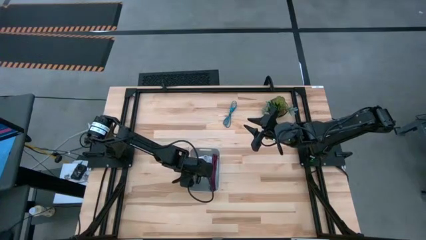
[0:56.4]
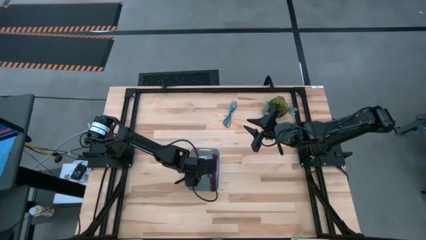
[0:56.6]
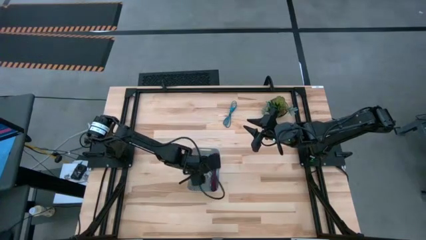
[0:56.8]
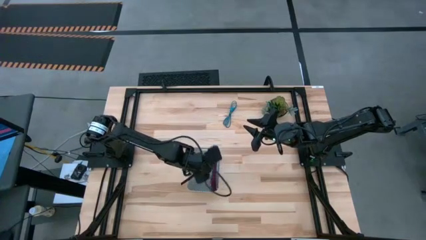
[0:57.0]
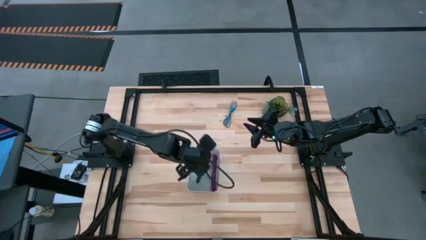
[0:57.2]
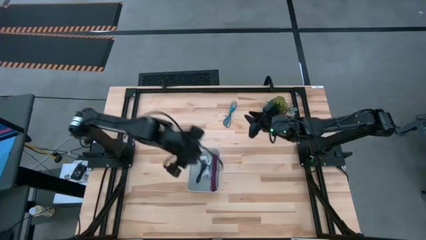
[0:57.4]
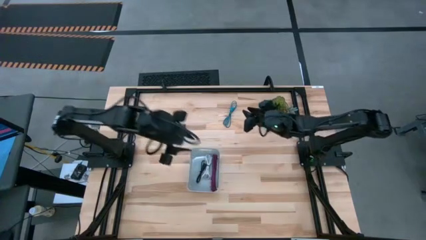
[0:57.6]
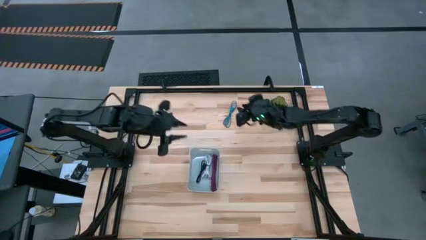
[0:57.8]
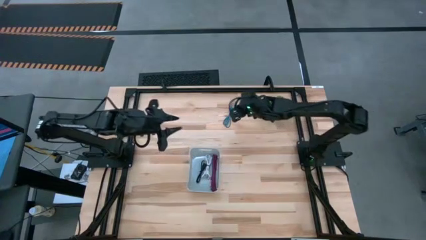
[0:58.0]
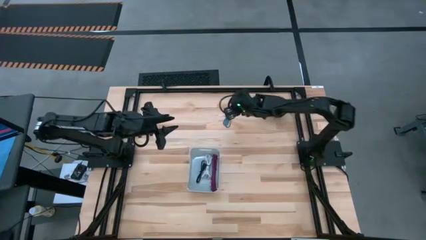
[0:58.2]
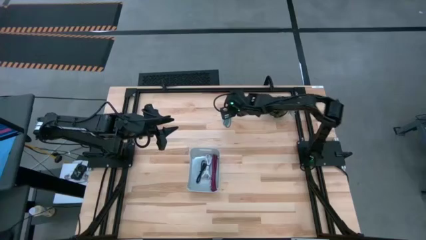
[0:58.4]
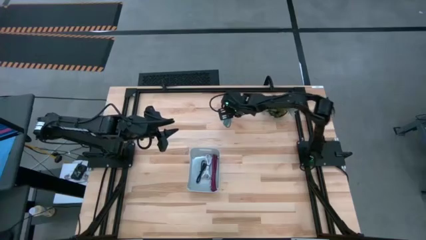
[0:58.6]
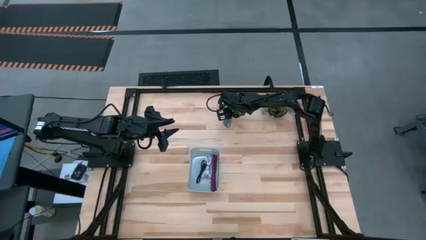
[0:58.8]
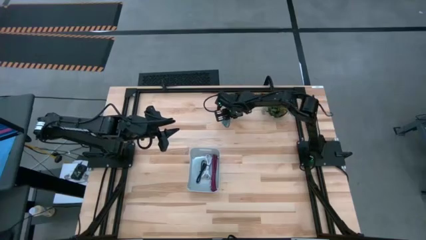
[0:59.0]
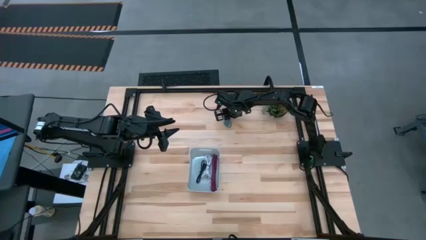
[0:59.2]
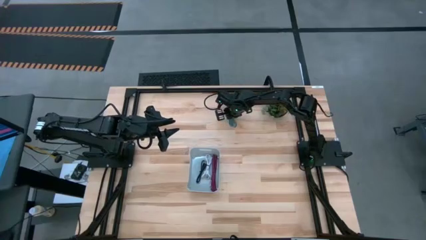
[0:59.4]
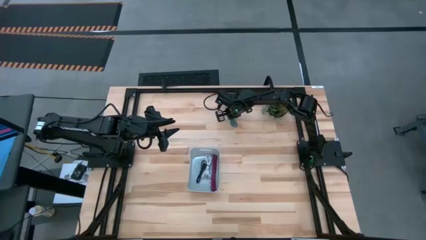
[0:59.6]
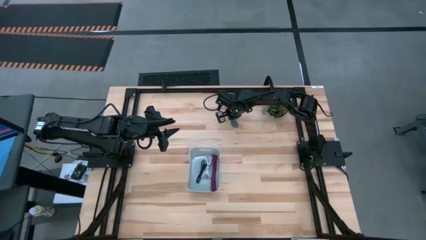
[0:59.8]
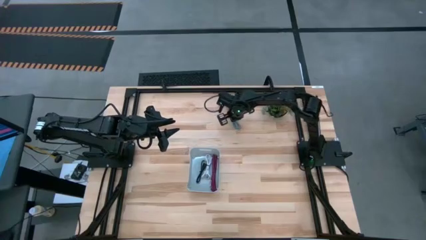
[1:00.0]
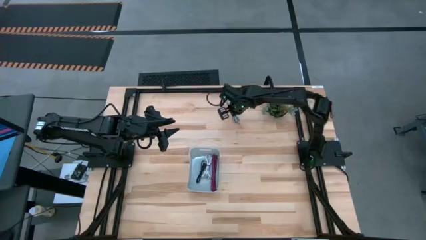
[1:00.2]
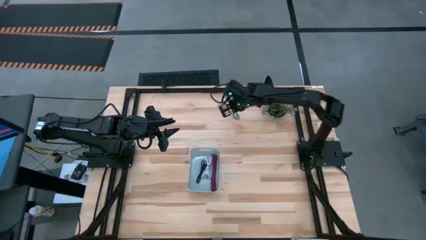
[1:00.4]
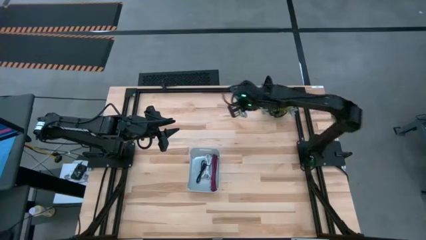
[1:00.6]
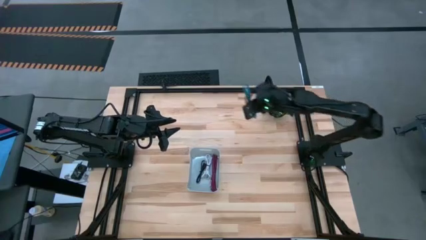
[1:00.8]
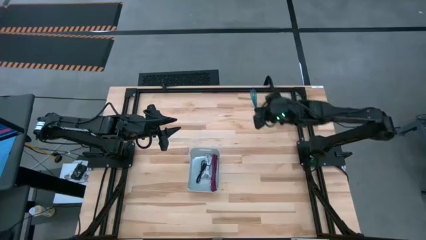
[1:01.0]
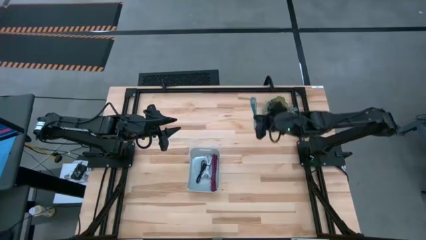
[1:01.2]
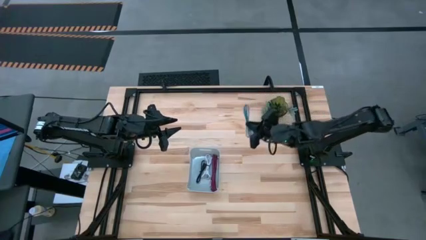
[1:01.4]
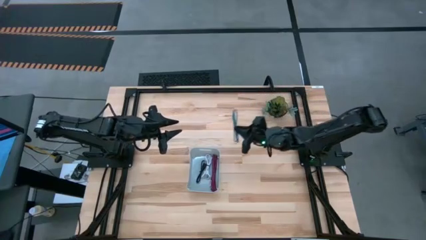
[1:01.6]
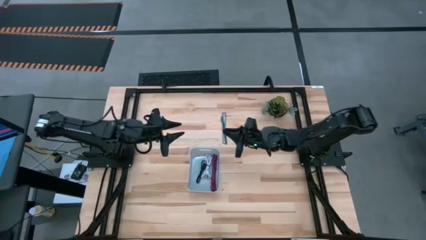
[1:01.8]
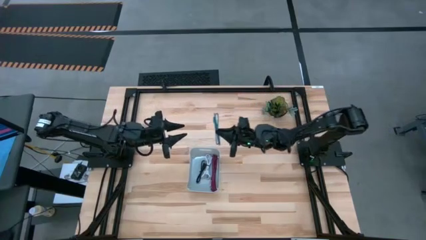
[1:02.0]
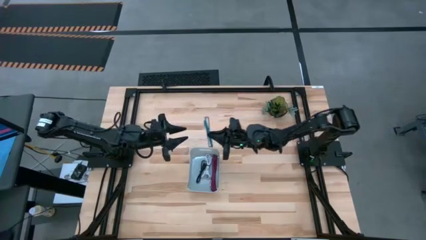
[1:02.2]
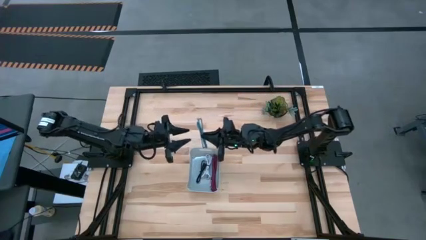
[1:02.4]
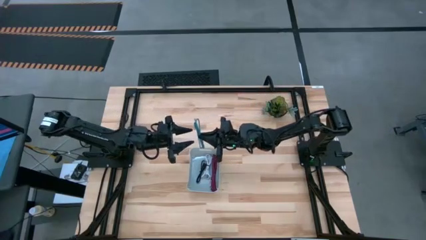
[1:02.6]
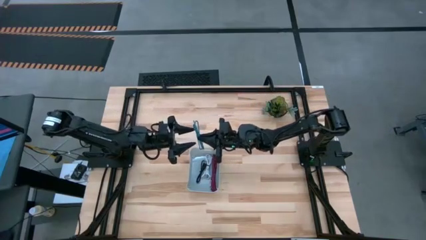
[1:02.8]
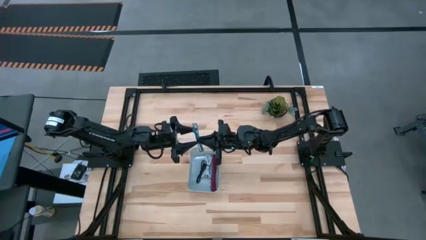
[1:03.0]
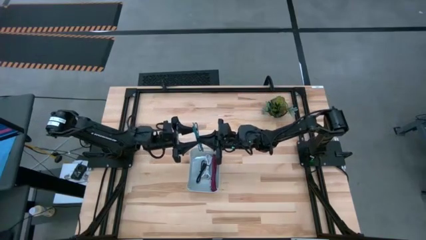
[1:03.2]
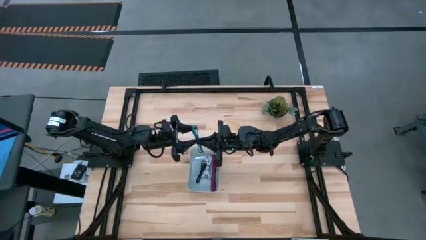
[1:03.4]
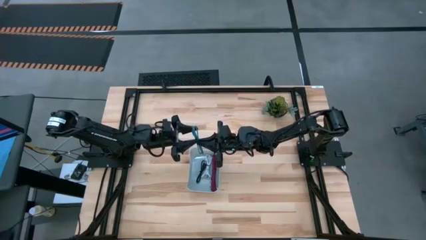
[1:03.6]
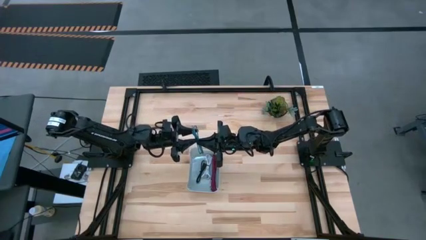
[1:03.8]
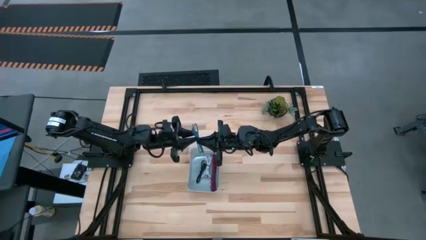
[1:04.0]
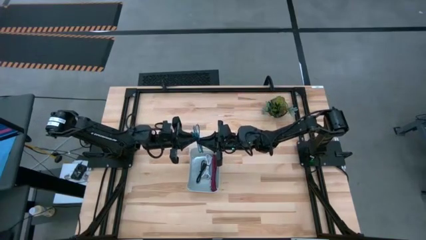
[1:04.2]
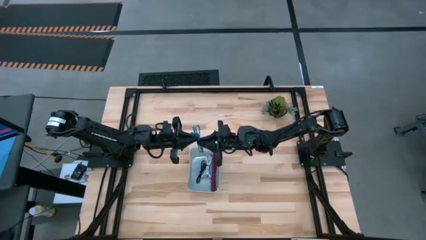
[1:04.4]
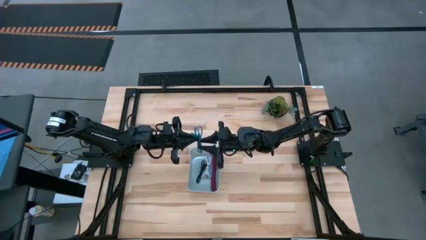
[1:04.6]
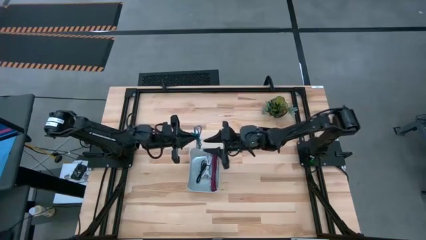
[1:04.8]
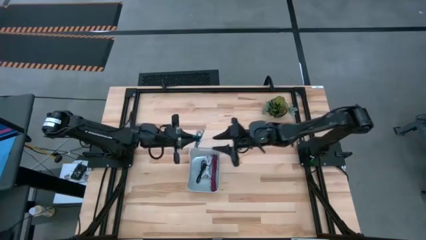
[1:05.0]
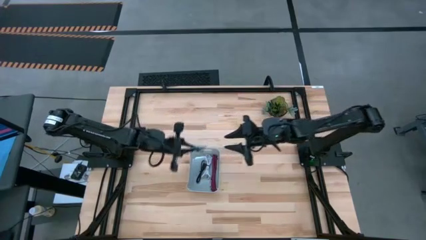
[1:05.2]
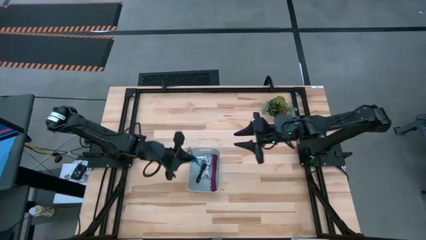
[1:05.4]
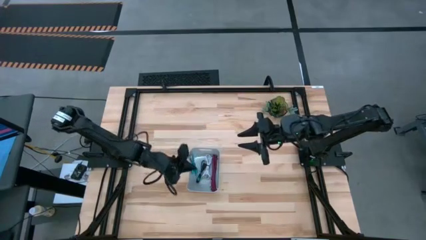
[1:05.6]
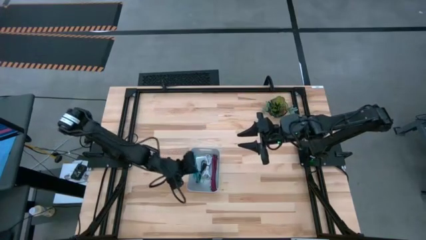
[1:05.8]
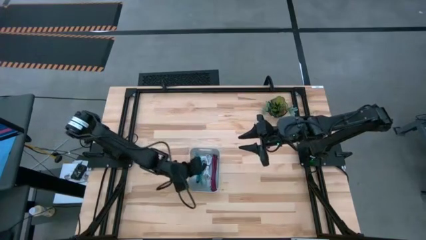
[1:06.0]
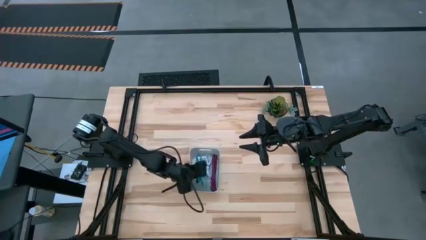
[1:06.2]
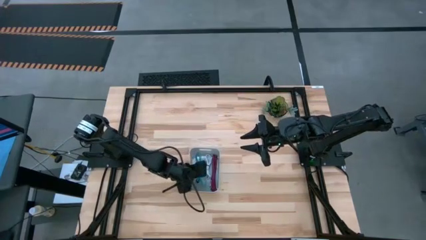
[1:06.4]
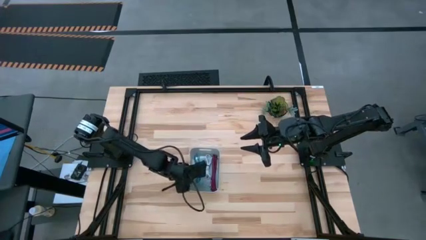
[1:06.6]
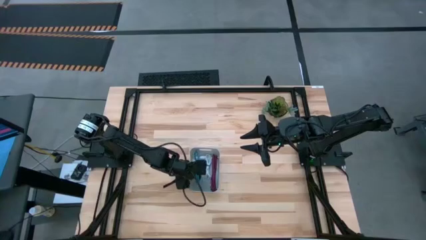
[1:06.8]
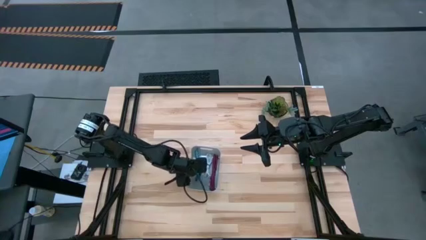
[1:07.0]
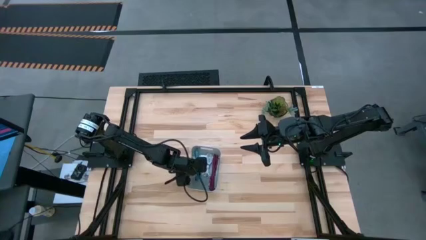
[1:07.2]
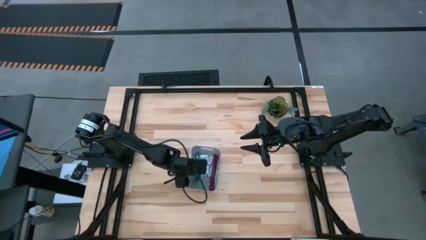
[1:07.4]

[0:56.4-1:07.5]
Task: Pick and place USB-C Cables
Put the blue charger cable into the gray bin

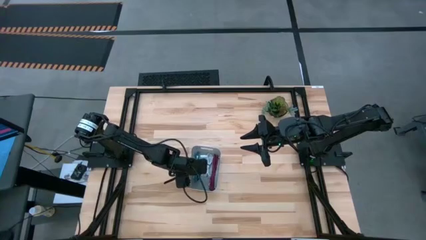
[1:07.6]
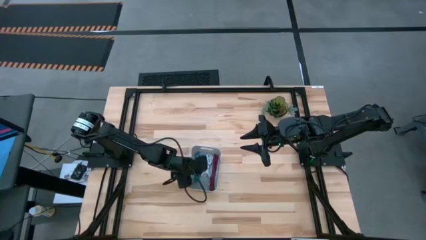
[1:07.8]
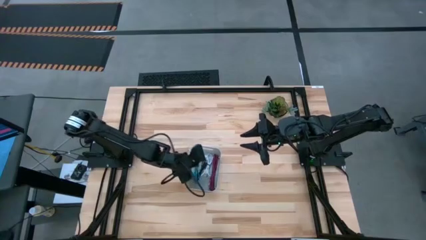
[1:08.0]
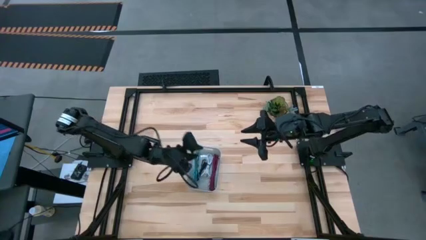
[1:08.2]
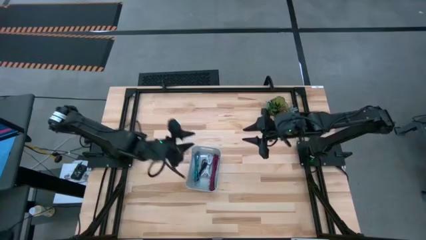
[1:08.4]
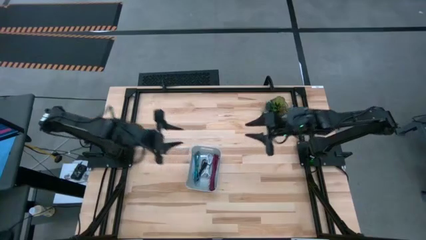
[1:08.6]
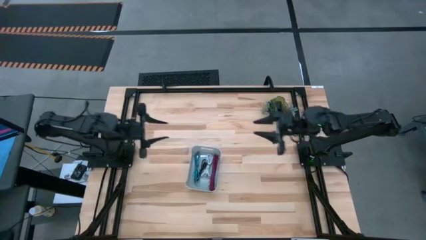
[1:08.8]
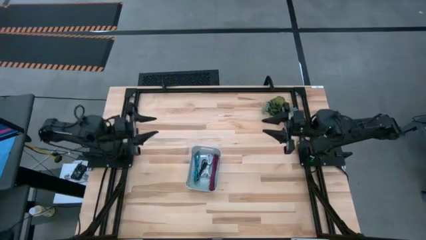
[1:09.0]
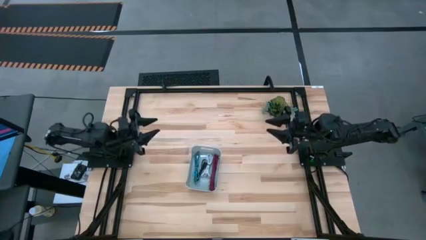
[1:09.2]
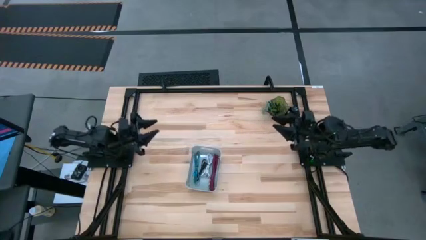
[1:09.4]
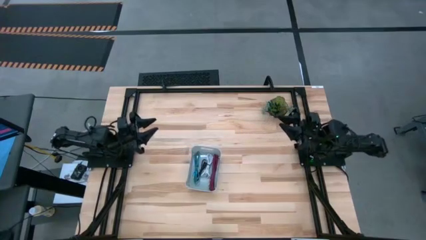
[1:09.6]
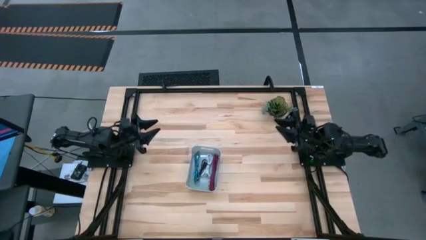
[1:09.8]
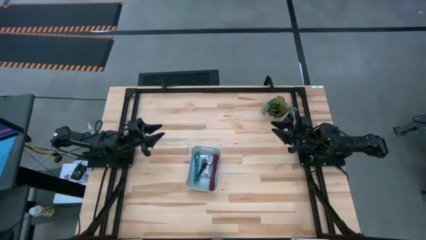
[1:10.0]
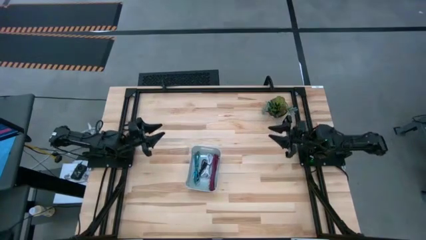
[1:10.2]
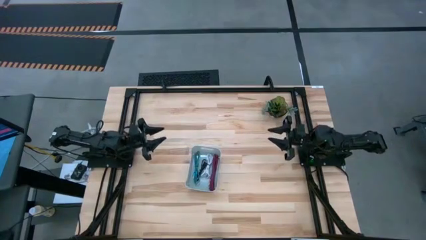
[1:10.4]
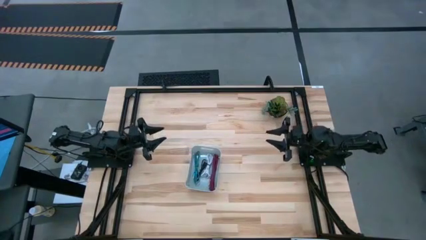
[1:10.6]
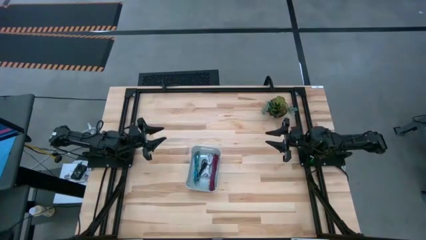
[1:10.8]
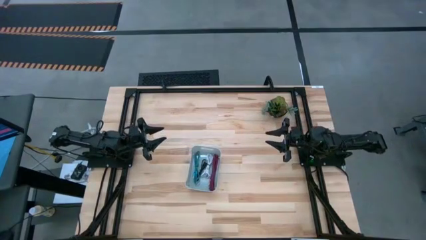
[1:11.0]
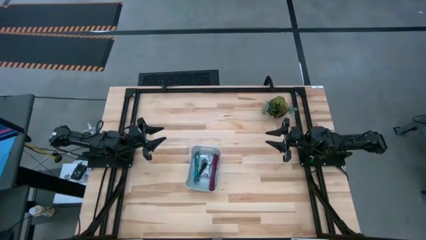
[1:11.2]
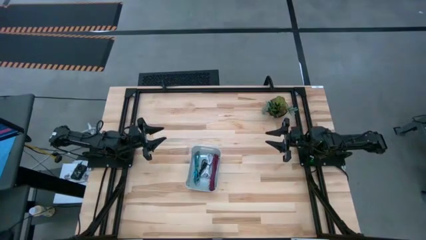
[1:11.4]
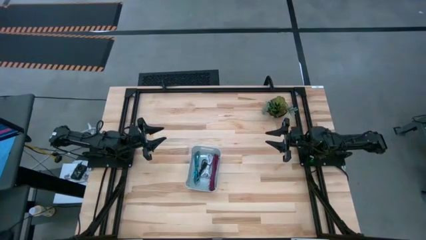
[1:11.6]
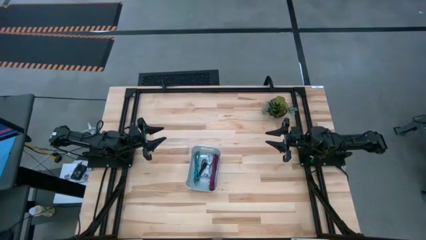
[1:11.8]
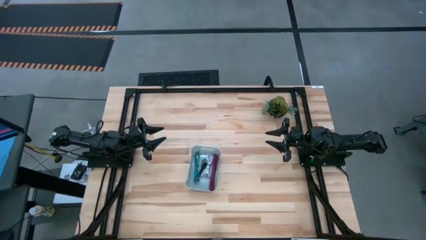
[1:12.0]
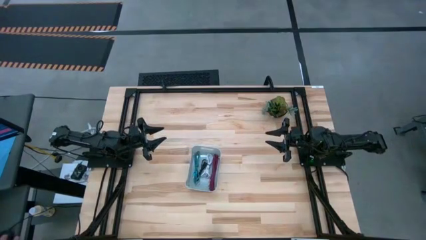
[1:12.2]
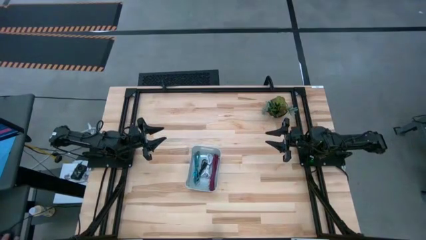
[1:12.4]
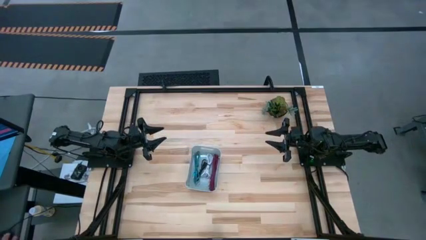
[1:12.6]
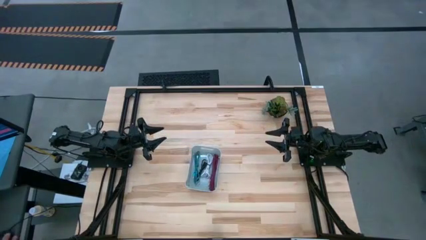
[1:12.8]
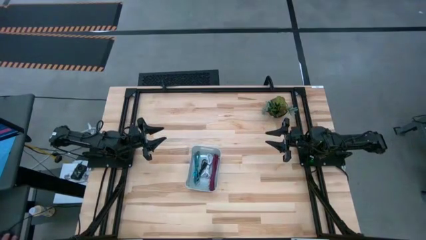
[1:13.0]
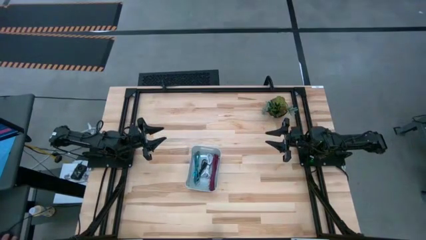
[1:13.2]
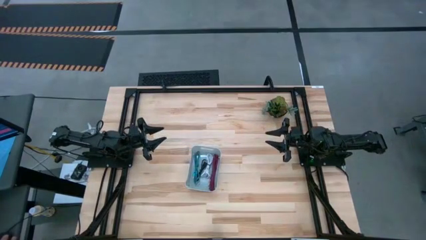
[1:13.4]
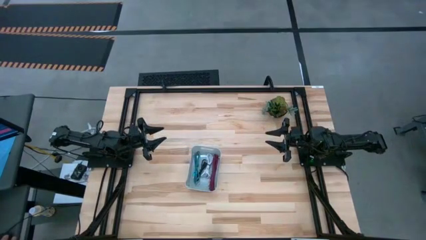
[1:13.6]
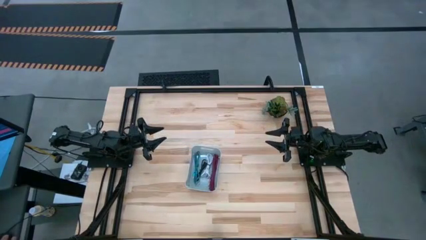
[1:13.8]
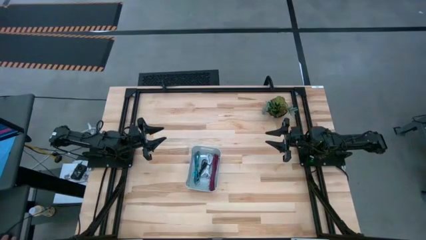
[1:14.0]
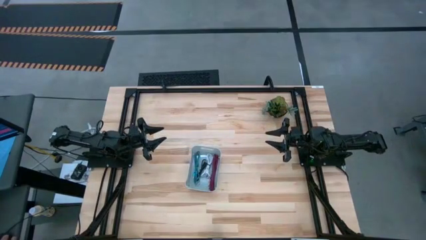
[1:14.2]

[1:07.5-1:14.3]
Return to Home Position
